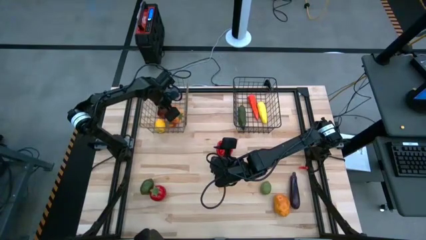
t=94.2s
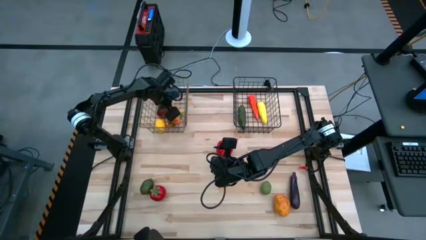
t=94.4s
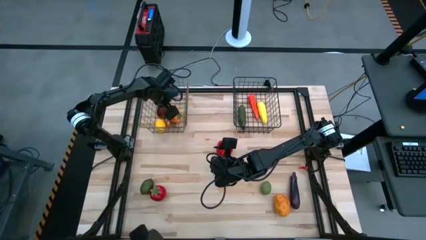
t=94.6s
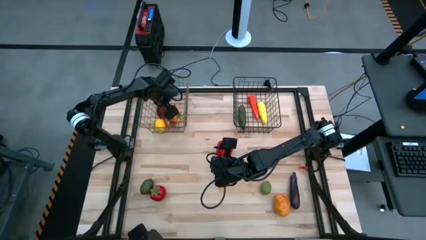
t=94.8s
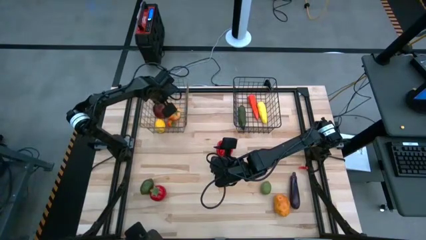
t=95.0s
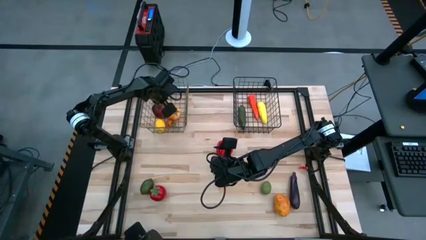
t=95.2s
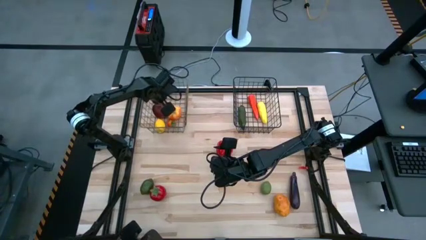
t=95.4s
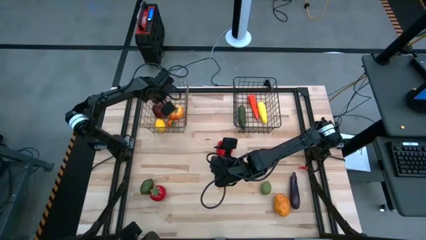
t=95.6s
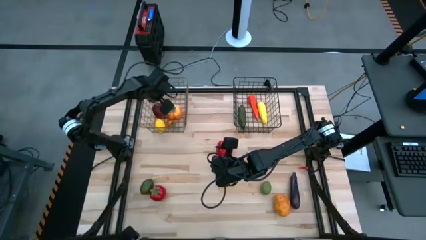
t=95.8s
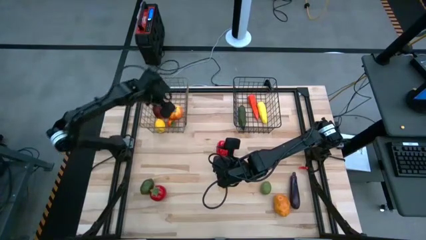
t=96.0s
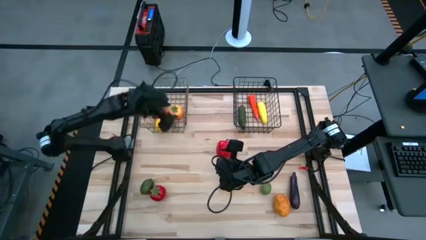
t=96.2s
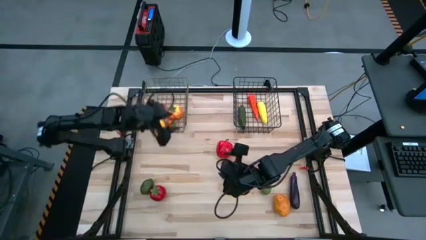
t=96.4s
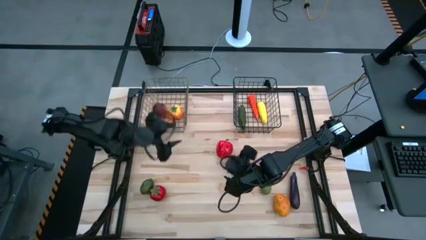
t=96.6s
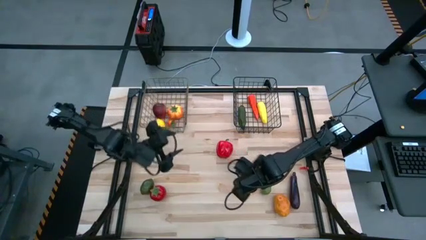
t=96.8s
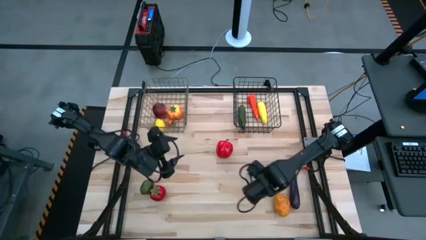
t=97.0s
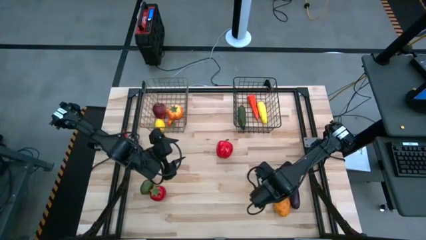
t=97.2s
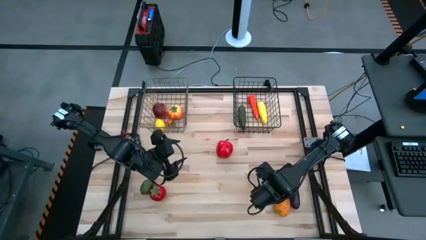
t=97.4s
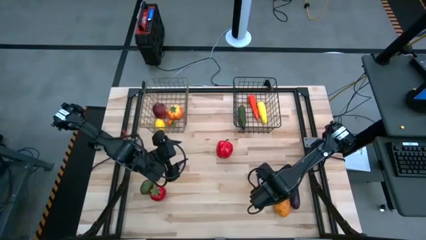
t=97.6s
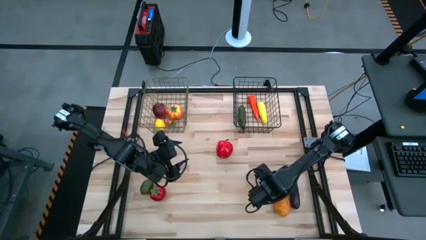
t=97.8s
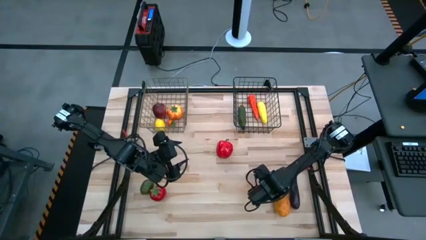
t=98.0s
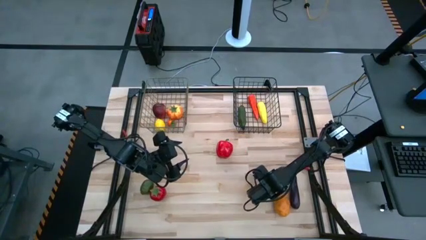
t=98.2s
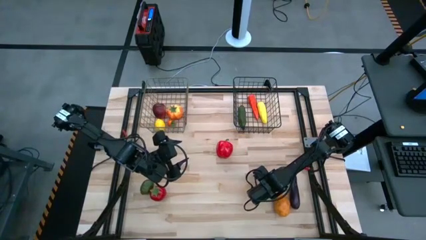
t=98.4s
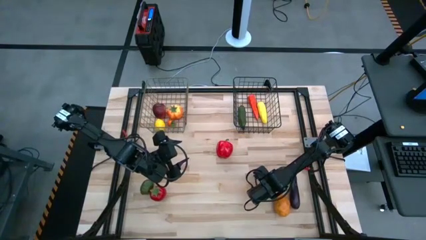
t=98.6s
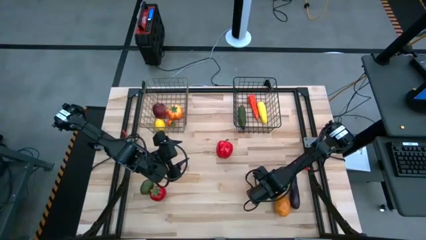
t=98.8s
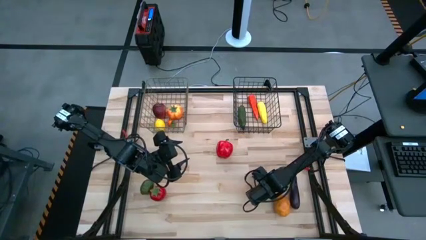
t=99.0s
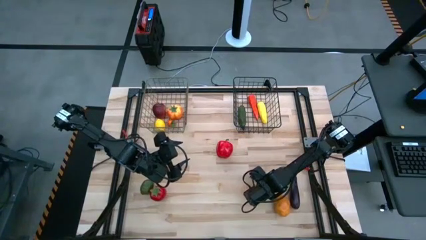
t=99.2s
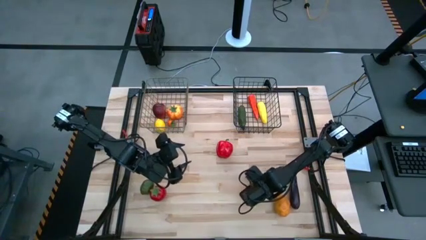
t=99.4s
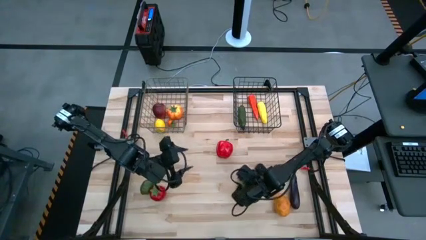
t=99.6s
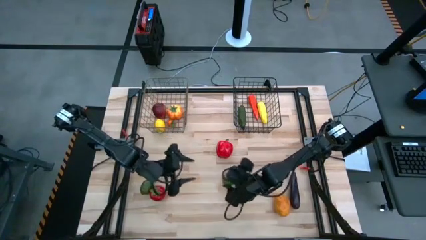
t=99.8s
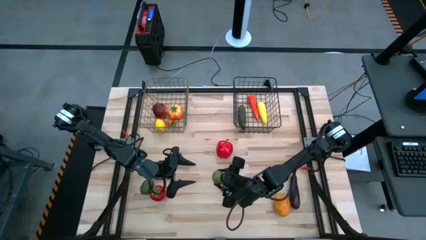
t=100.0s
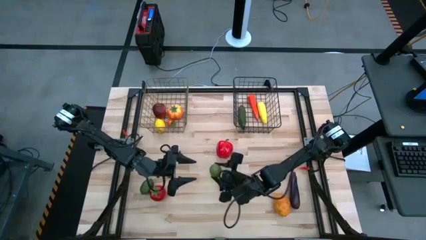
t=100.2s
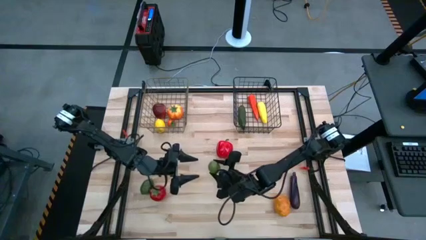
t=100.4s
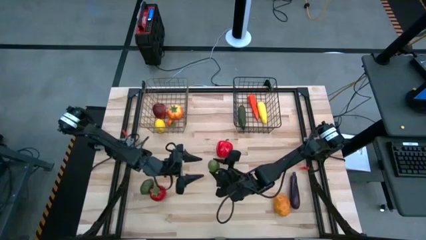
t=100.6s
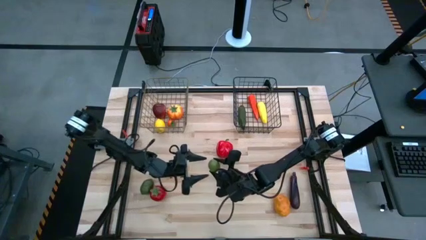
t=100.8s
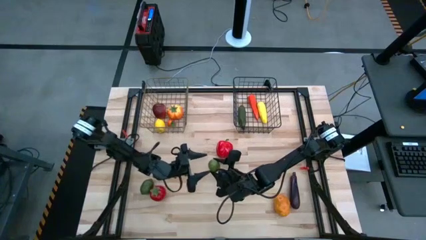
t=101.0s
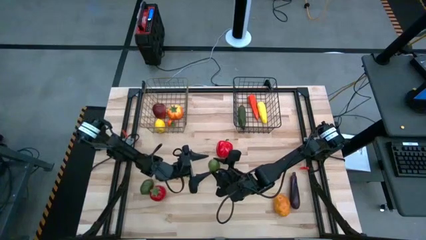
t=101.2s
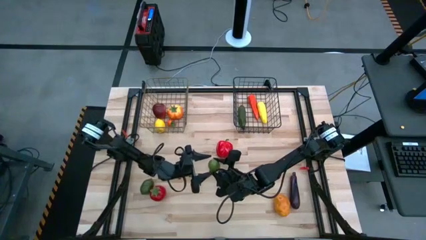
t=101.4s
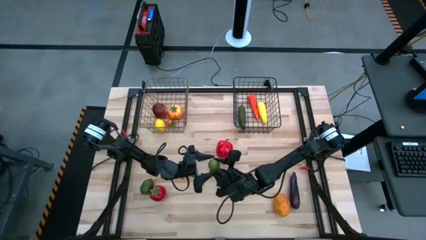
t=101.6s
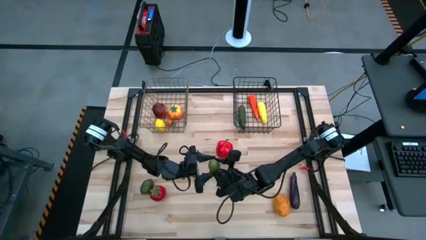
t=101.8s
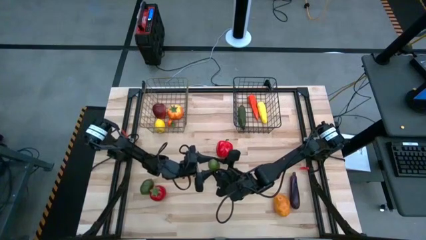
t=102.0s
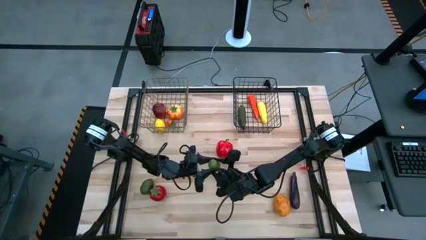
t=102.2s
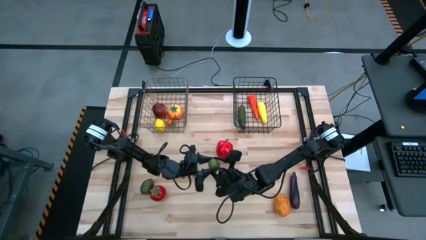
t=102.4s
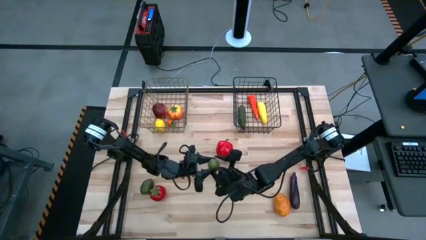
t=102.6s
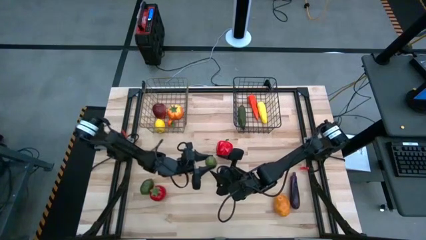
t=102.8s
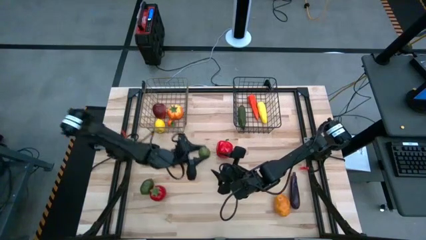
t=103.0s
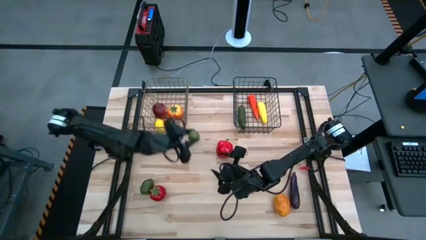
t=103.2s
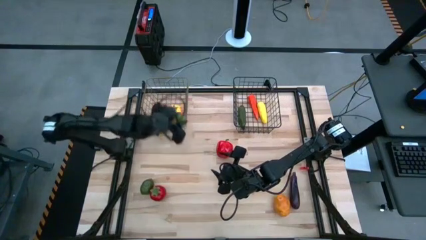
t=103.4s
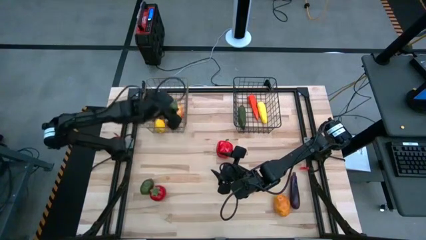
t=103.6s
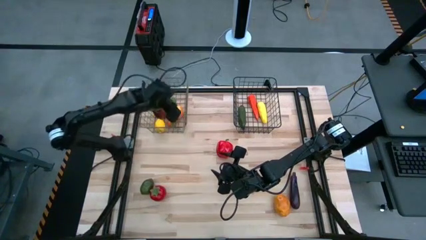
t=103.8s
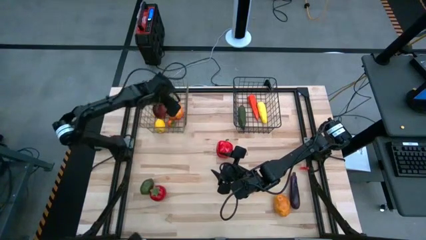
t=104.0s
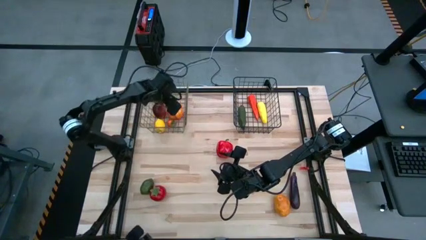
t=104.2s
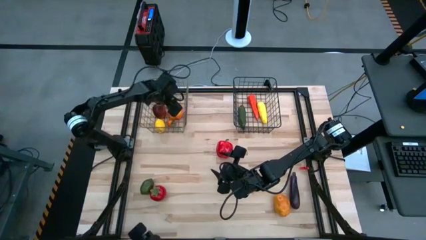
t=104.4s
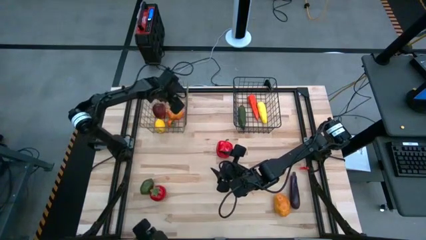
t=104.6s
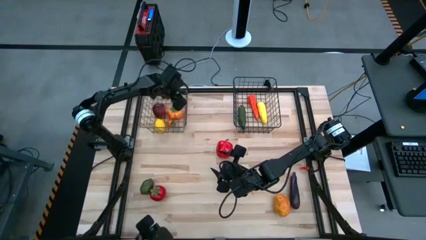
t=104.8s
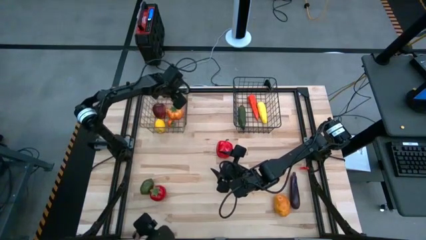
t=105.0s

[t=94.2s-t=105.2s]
Task: Sort produce into baskets
Put the green lime into the left yellow wire basket

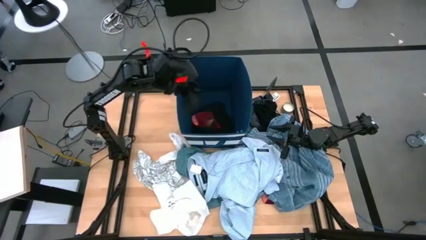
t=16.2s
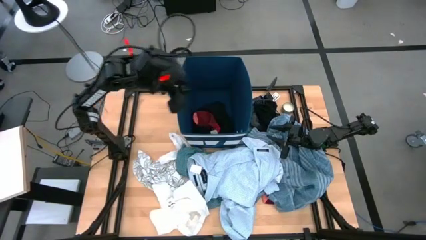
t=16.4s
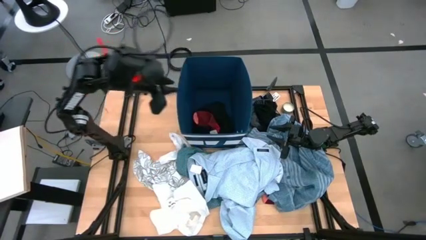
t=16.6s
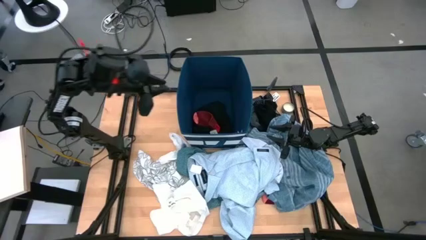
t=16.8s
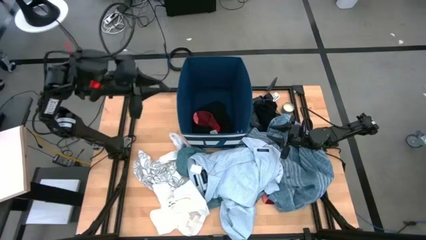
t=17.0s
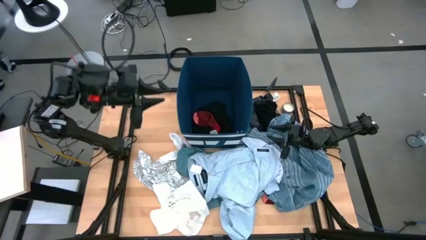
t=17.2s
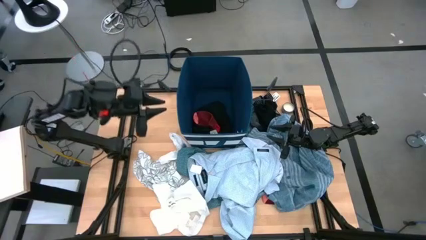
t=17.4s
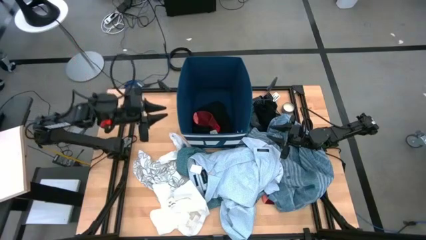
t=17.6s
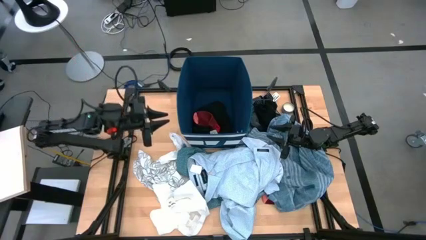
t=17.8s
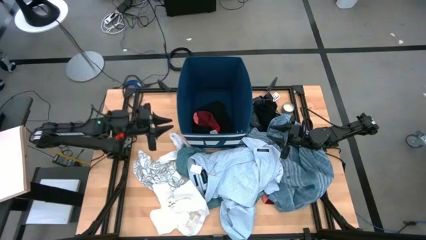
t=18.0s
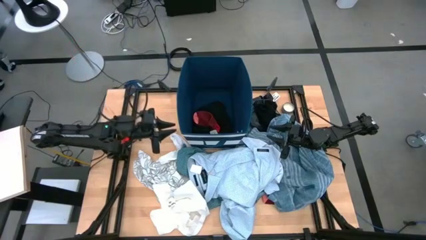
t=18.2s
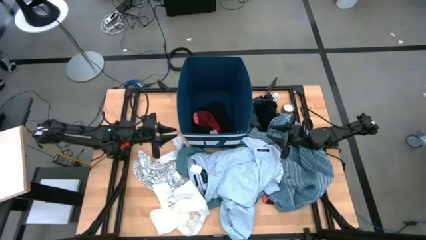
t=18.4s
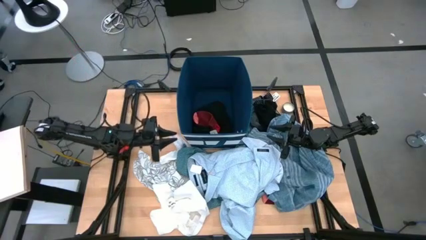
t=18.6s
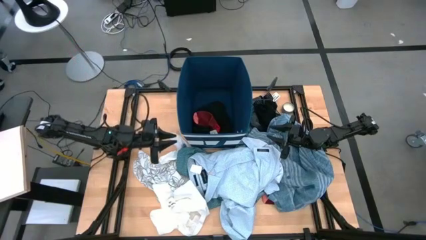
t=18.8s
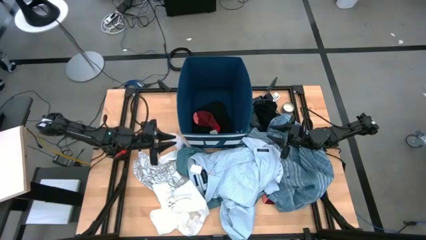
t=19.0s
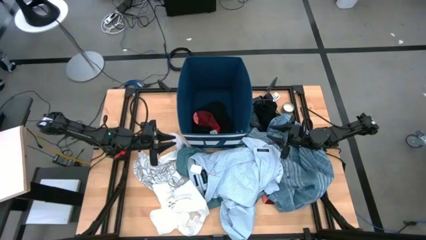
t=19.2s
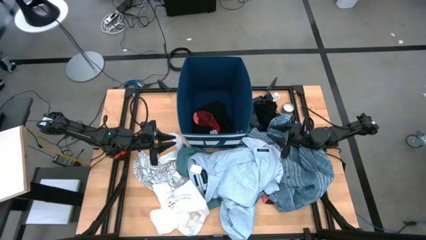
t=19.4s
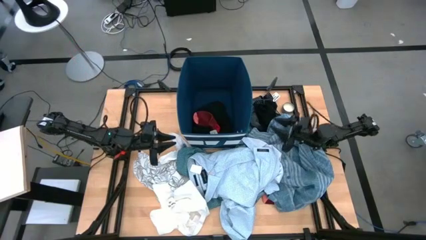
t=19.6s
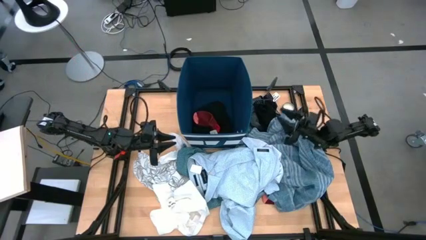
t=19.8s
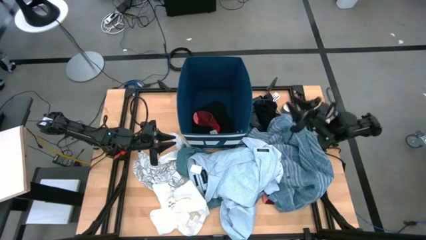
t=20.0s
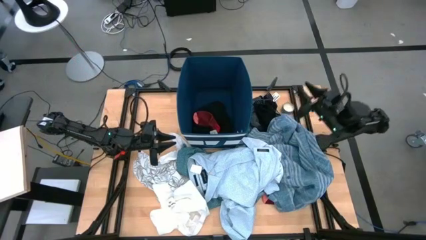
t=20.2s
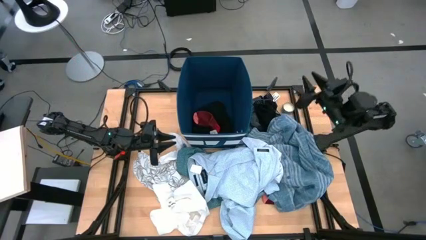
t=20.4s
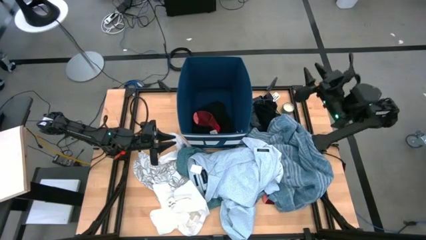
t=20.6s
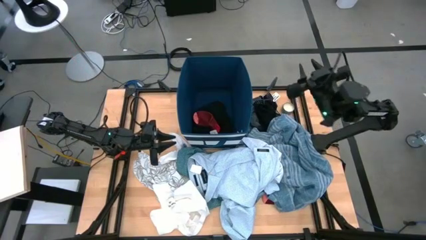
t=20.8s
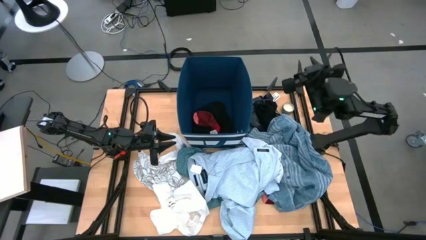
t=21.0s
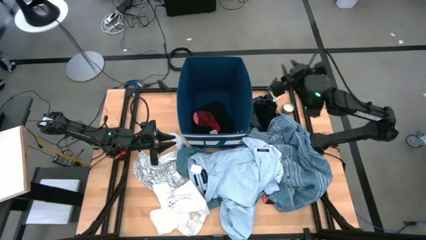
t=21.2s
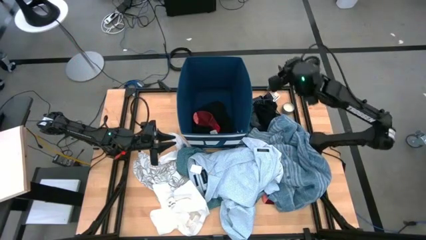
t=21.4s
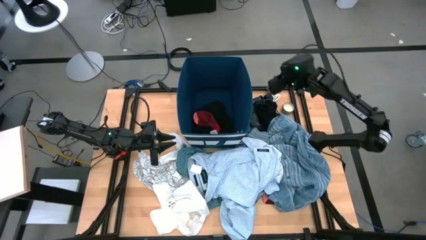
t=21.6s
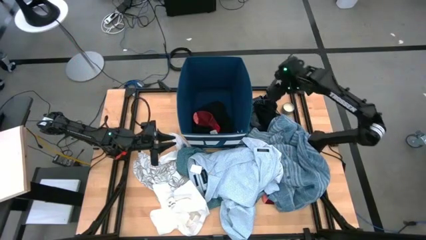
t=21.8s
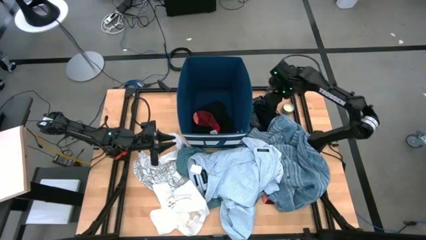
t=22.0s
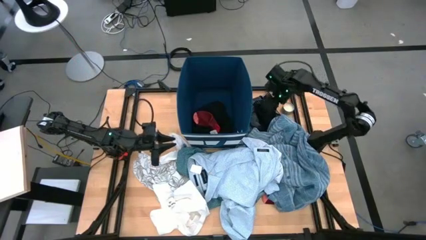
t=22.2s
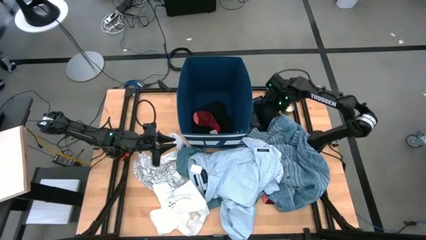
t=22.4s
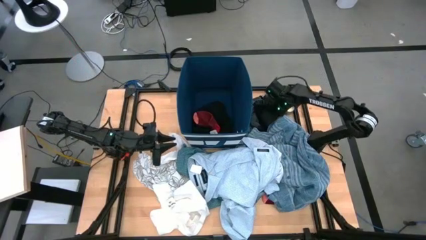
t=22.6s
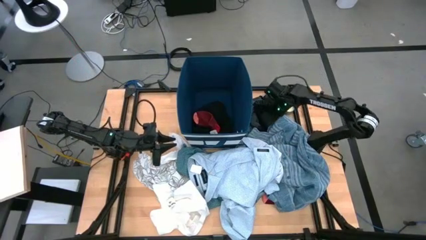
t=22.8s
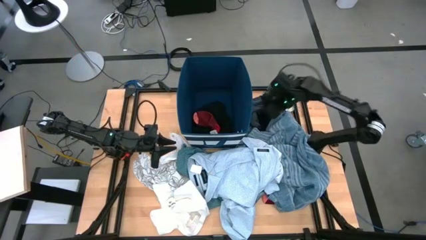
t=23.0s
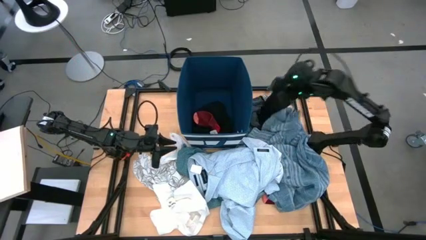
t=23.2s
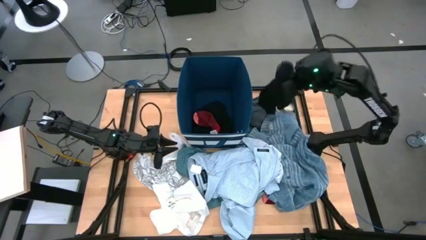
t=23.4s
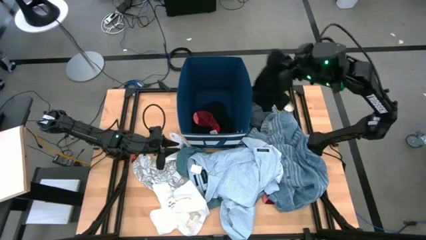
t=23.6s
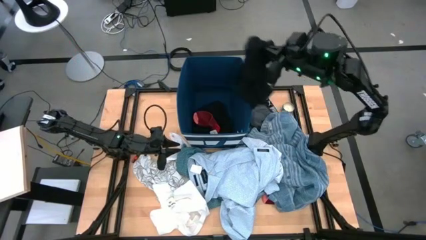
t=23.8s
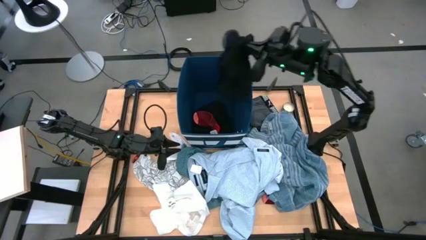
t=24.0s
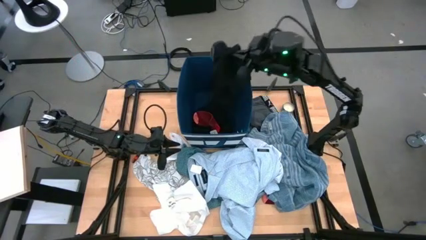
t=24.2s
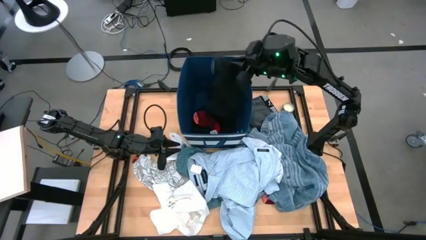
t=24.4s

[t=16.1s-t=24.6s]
Task: Sort clothes
Put the right black boxer into the blue bin
